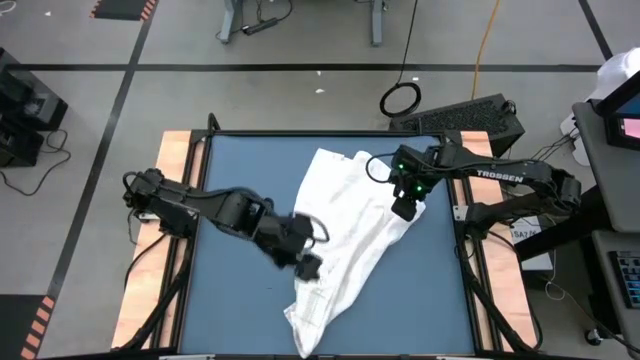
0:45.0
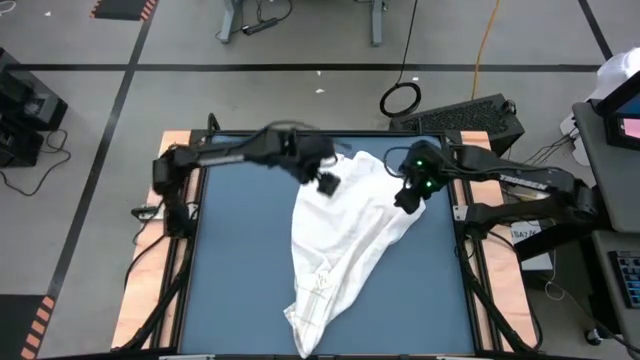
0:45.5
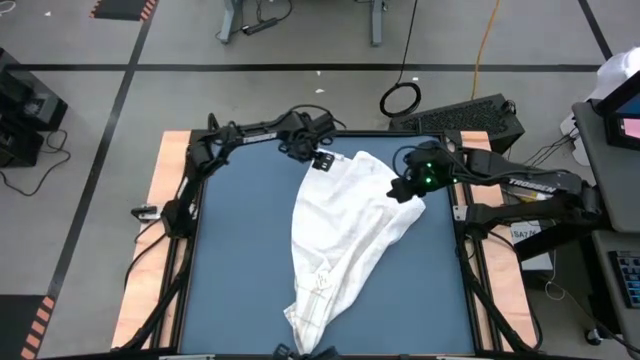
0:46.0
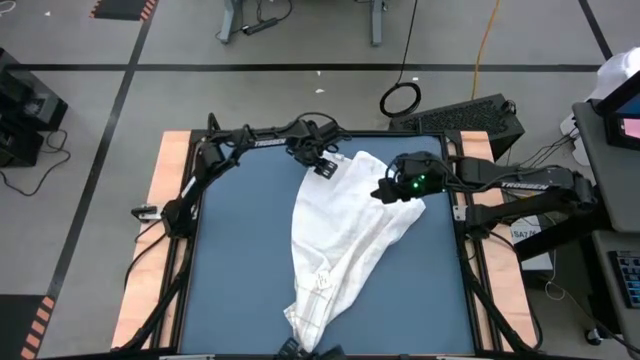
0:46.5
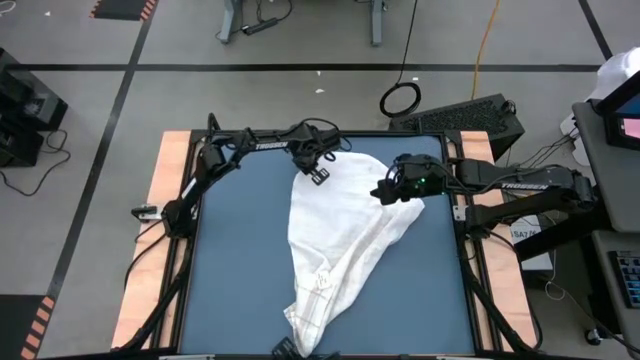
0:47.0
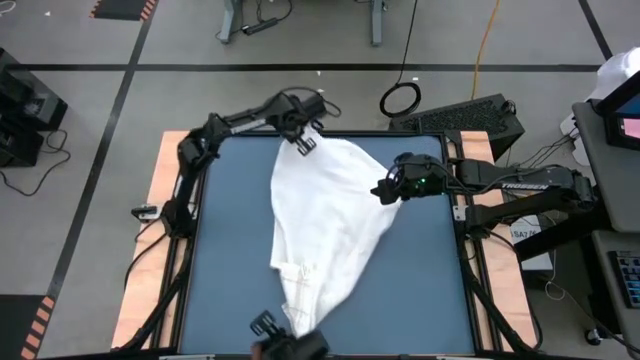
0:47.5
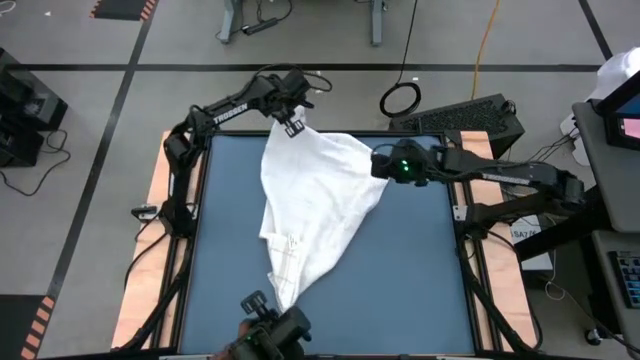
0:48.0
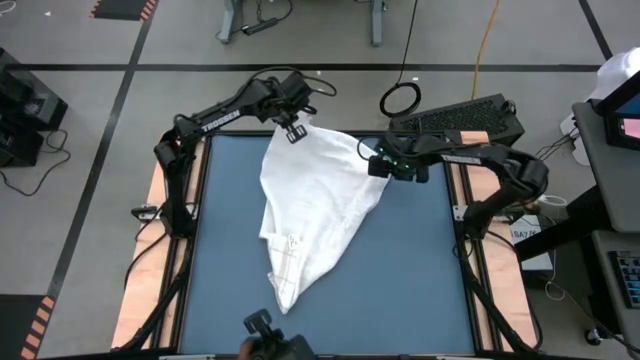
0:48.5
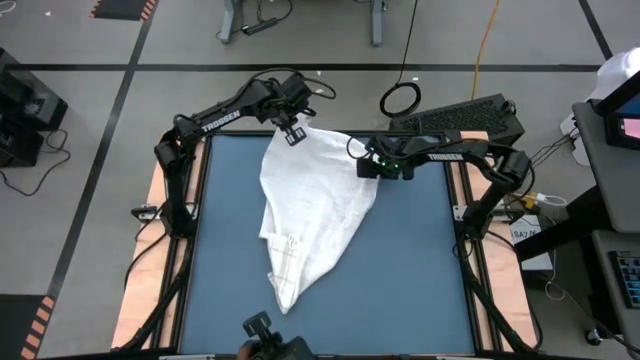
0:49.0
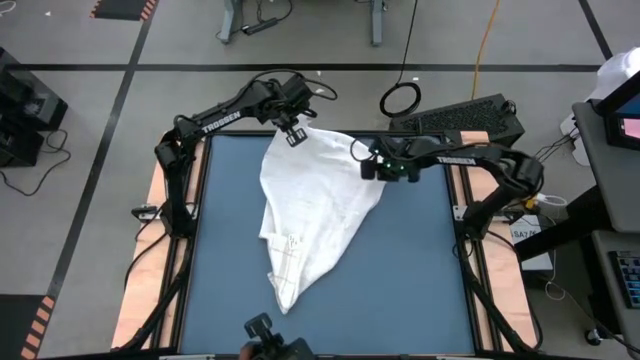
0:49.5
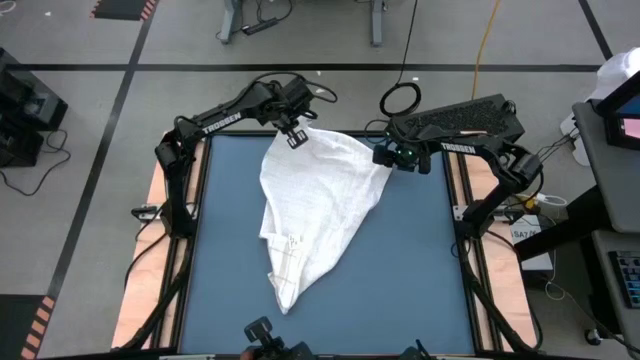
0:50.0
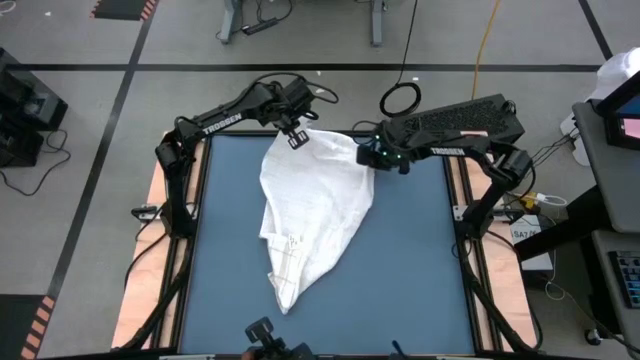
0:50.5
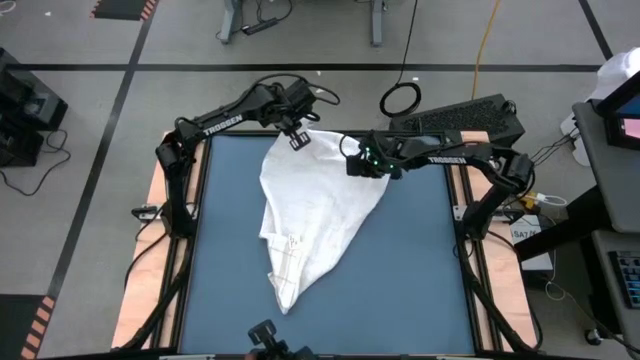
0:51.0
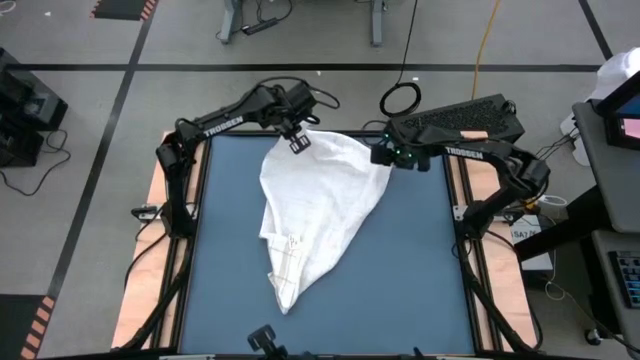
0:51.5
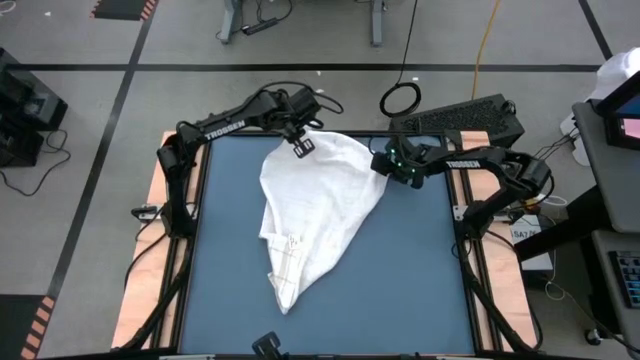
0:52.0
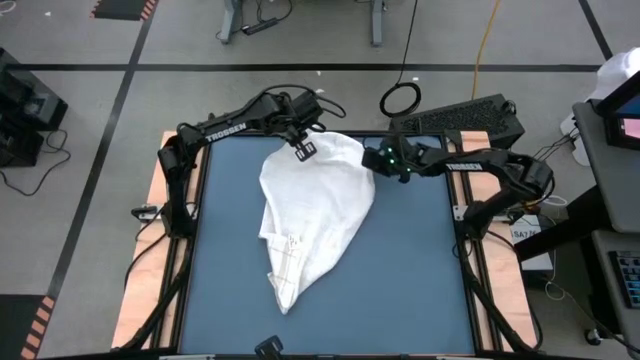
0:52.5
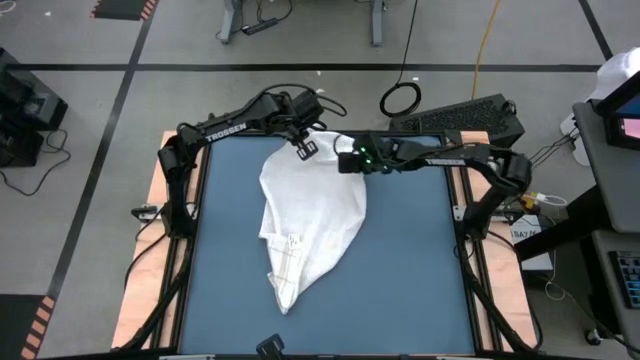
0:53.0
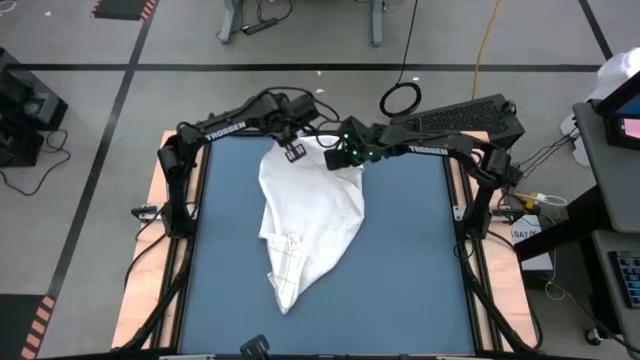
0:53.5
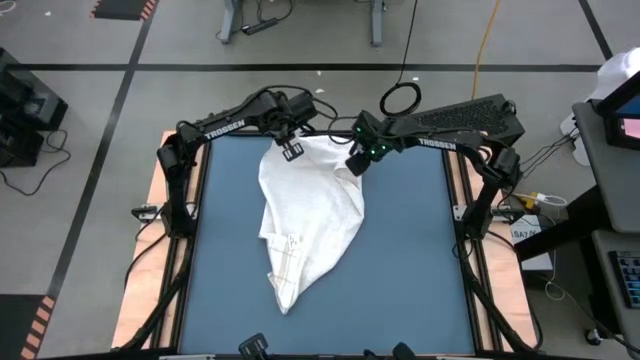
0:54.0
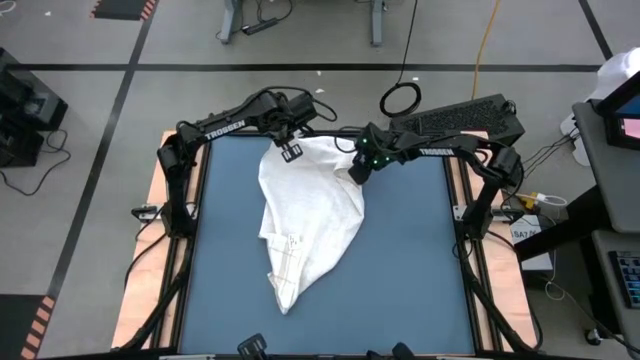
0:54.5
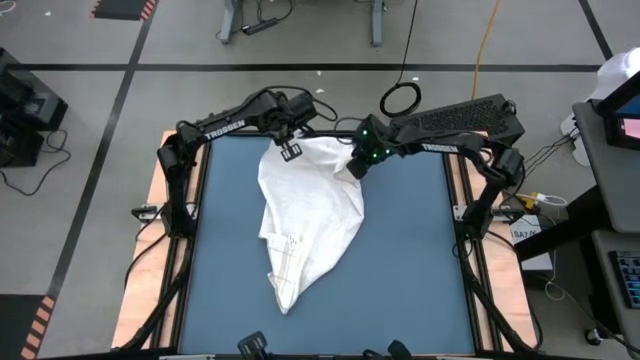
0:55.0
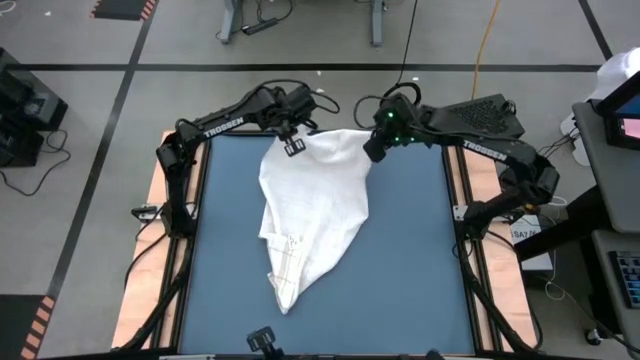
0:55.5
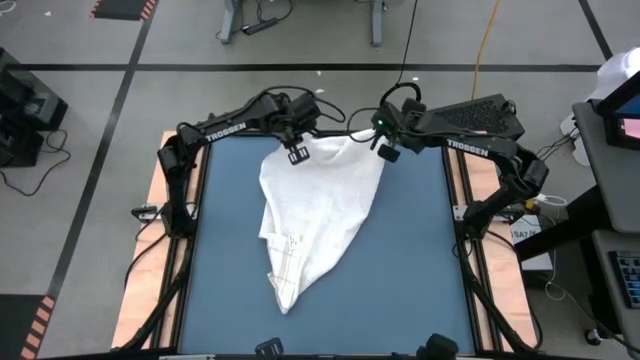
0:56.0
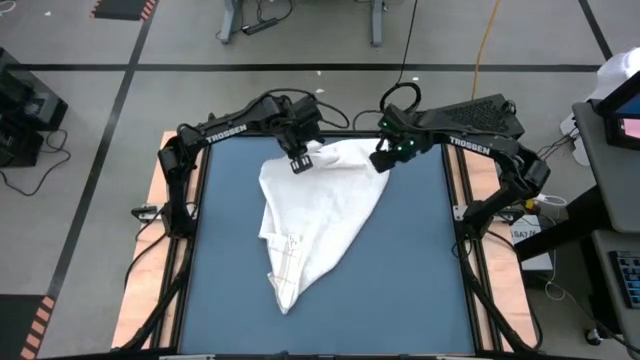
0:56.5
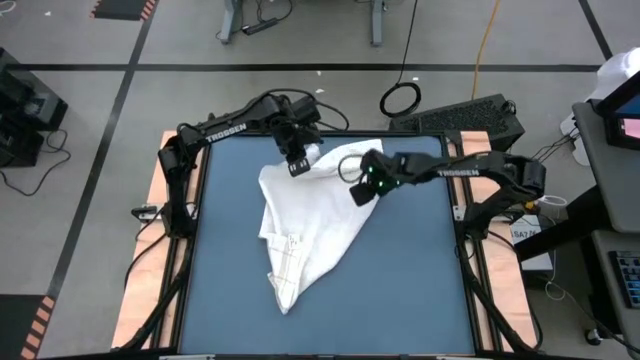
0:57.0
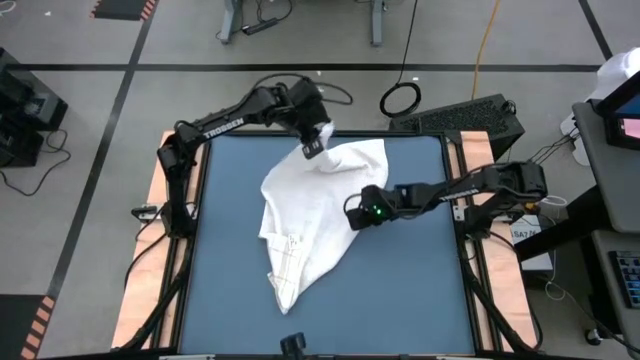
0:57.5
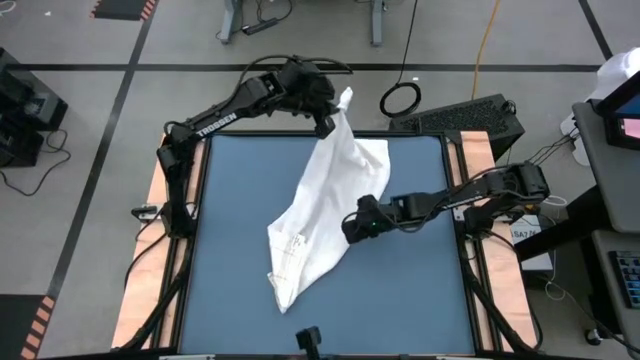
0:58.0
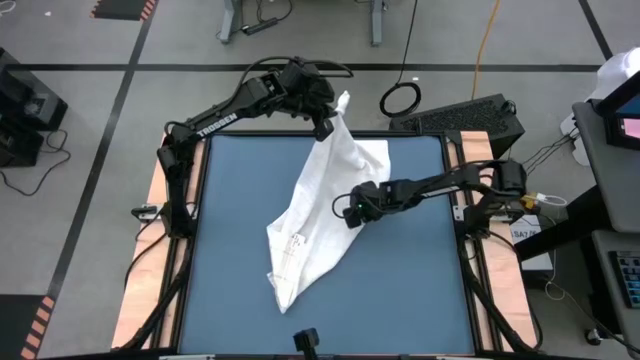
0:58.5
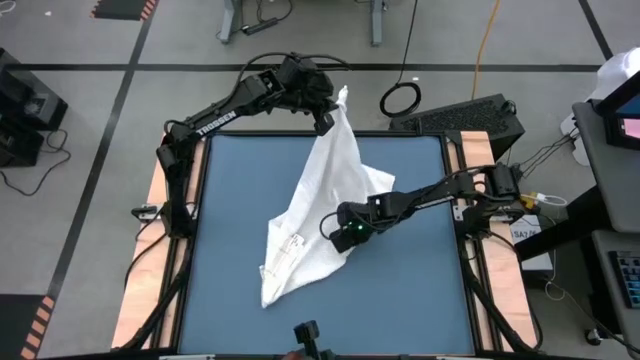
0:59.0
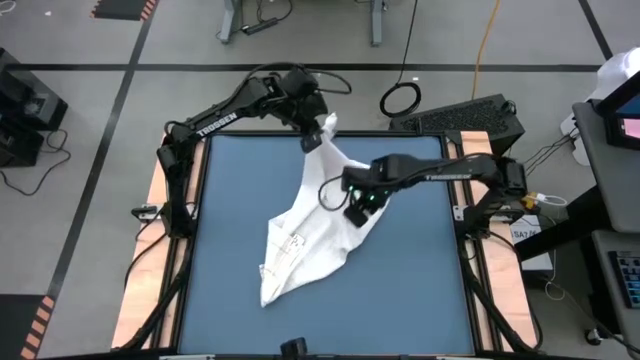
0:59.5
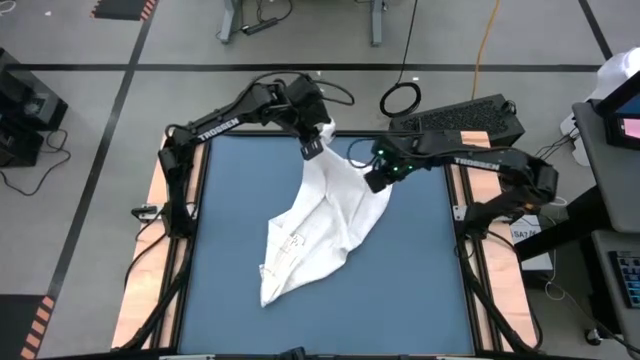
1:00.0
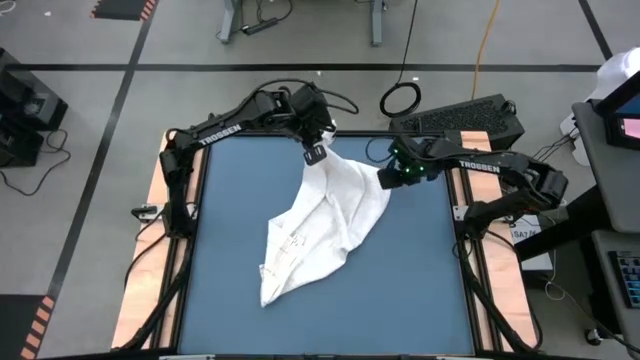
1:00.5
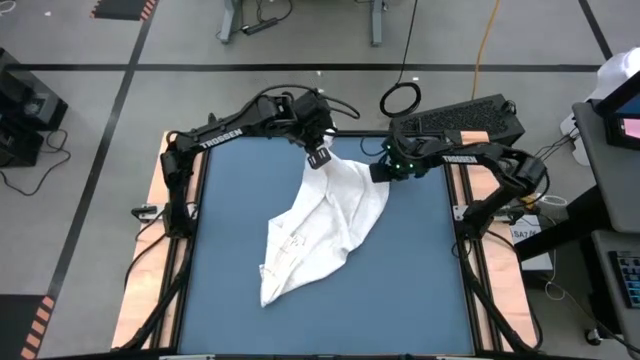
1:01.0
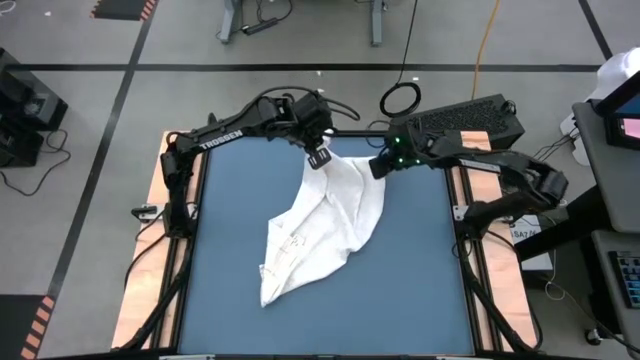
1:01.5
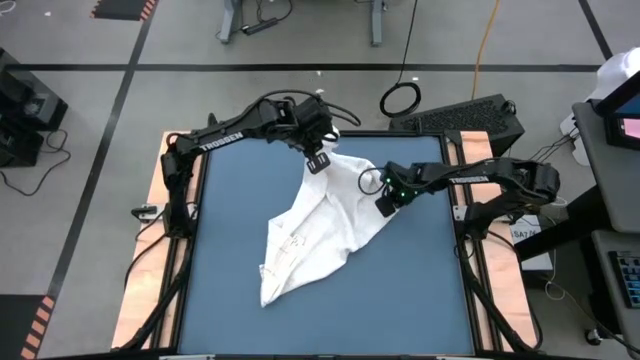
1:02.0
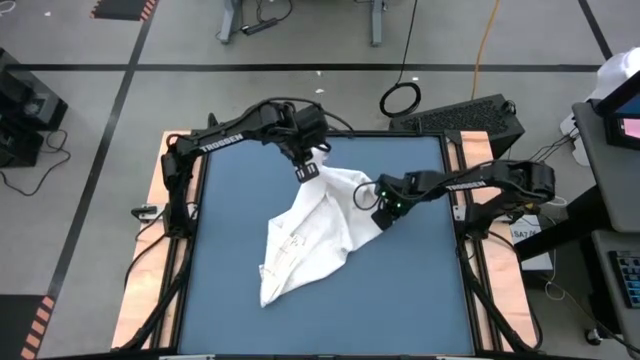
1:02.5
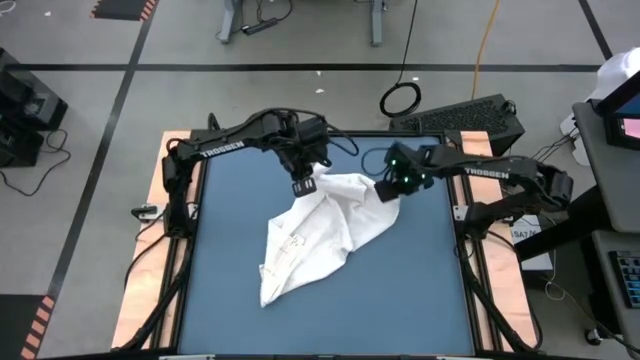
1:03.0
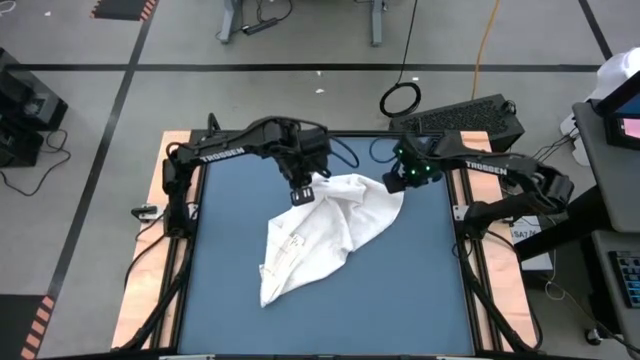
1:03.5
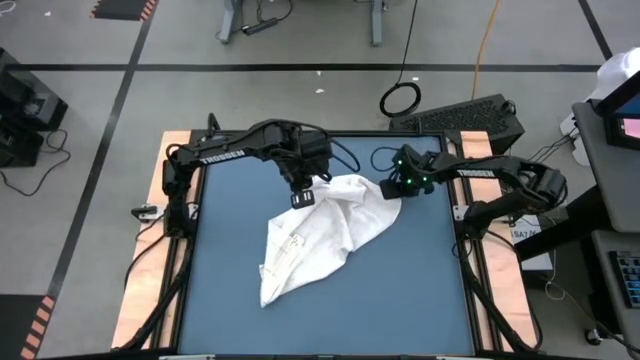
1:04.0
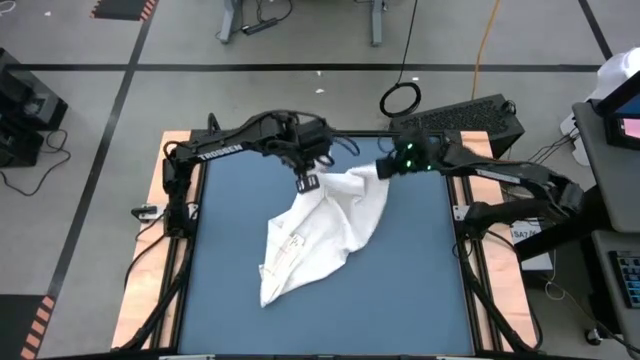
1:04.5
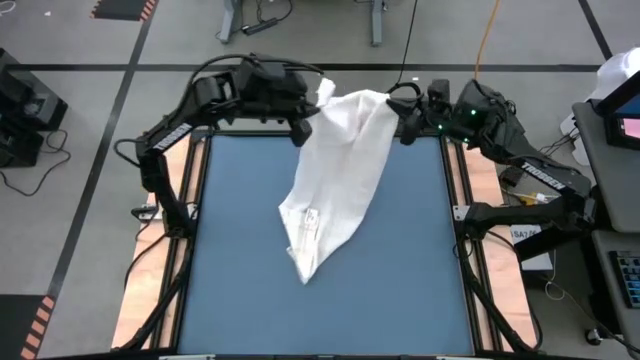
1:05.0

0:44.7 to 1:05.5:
Task: Roll towel into tight, uniform cylinder
Roll the white towel

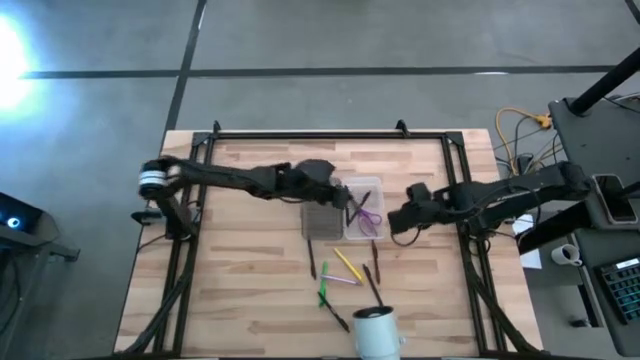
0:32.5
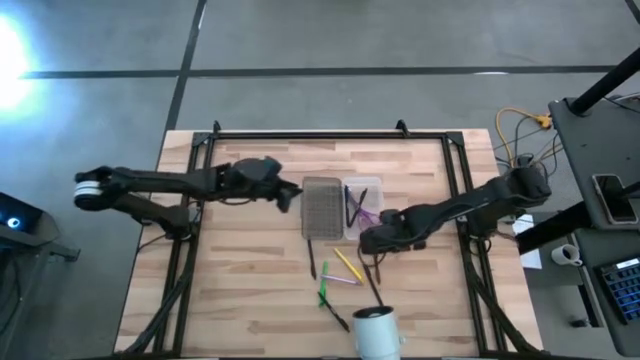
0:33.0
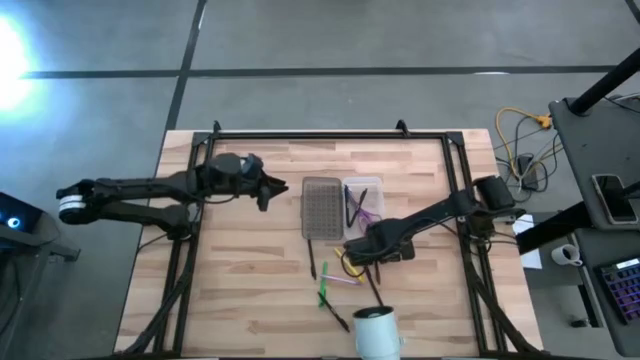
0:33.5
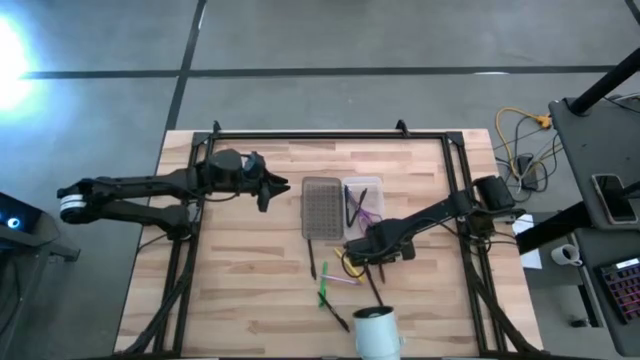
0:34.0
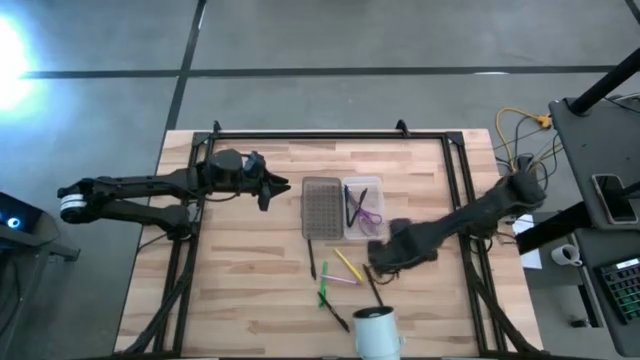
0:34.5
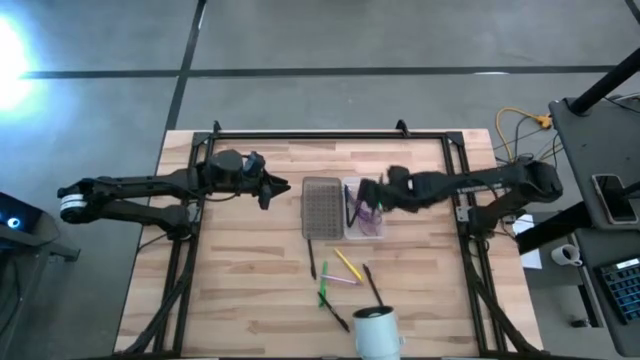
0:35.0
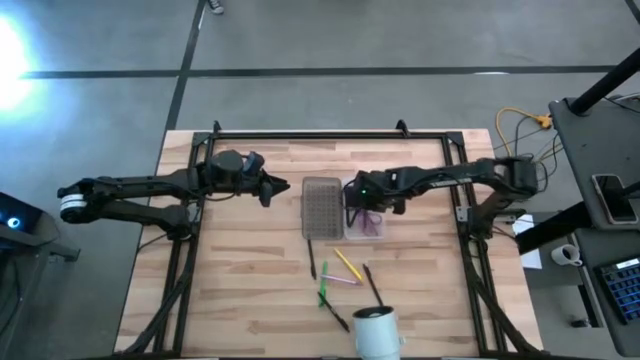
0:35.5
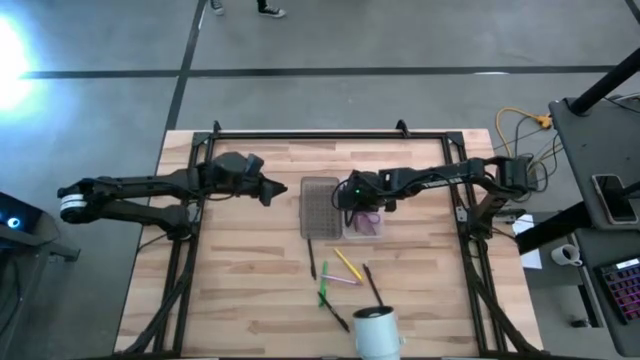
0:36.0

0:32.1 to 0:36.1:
Task: Pick & place school supplies into a supply box
Put the brown pen into the gray supply box
